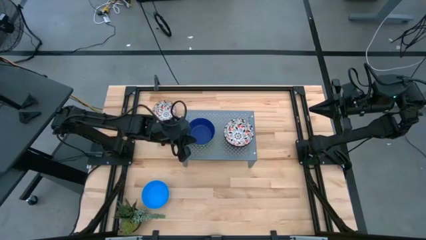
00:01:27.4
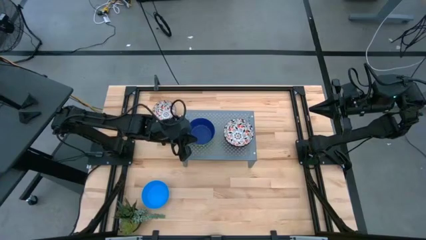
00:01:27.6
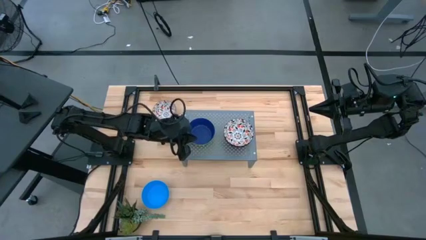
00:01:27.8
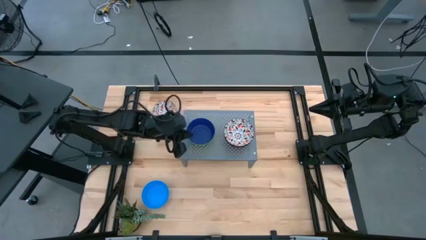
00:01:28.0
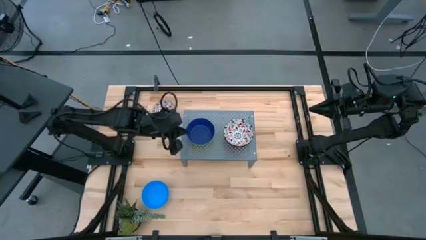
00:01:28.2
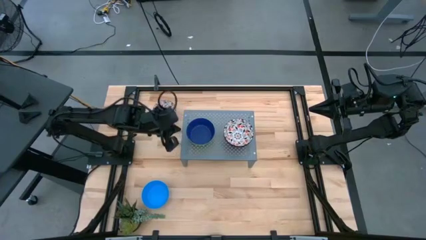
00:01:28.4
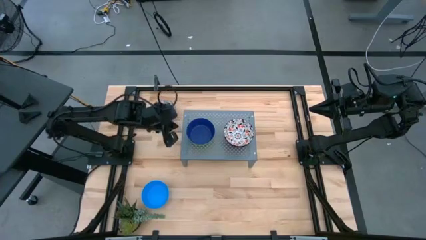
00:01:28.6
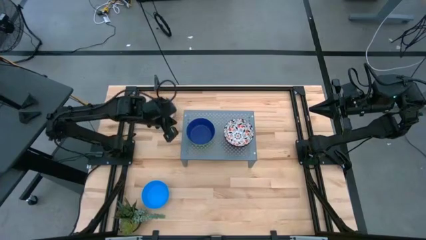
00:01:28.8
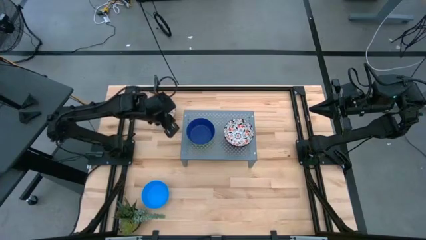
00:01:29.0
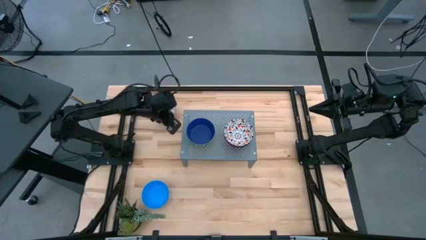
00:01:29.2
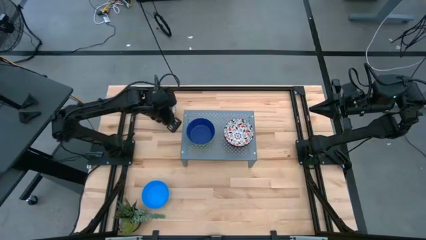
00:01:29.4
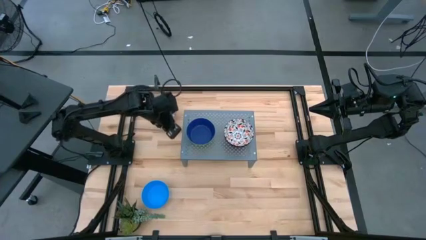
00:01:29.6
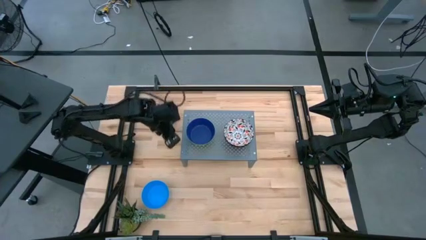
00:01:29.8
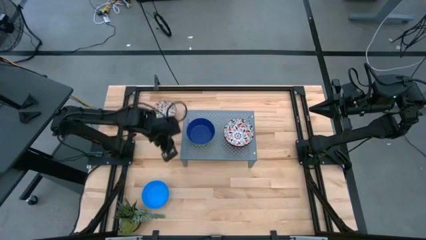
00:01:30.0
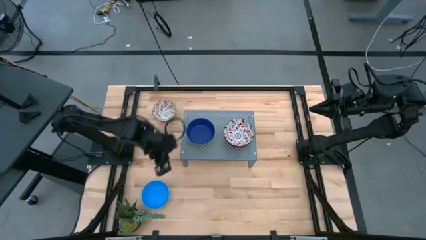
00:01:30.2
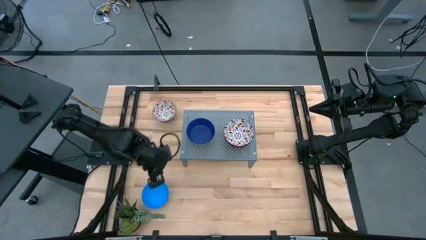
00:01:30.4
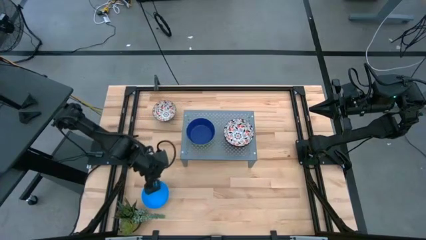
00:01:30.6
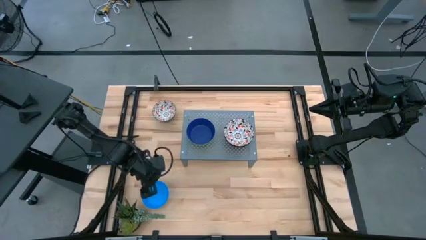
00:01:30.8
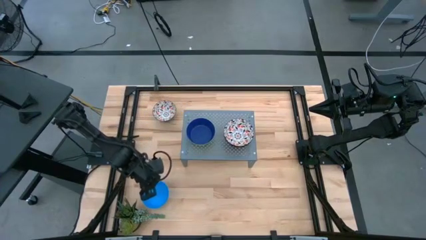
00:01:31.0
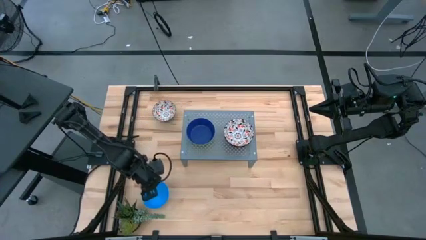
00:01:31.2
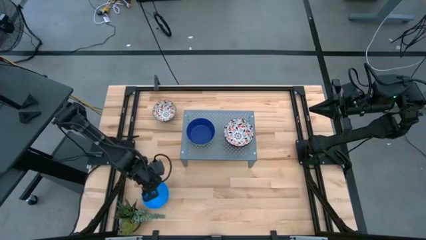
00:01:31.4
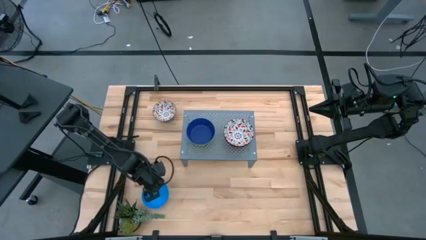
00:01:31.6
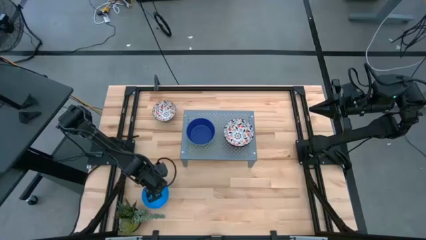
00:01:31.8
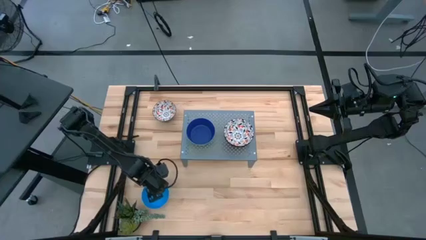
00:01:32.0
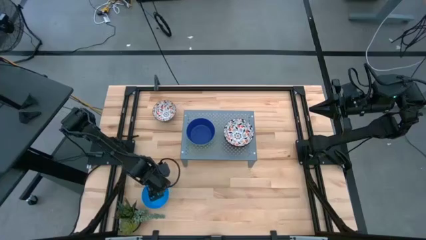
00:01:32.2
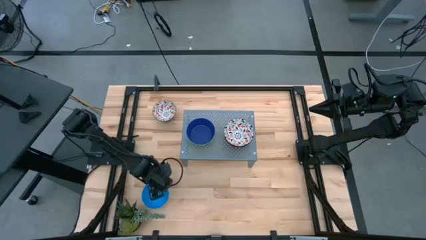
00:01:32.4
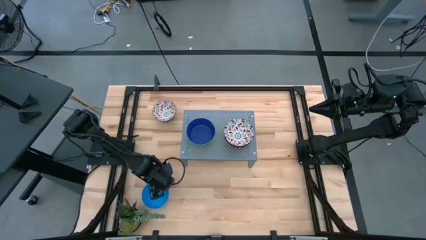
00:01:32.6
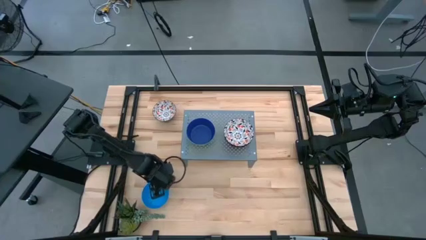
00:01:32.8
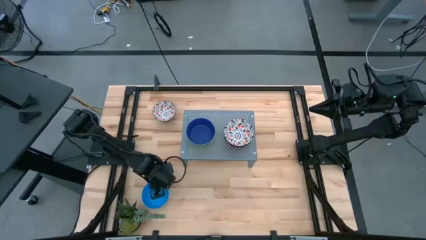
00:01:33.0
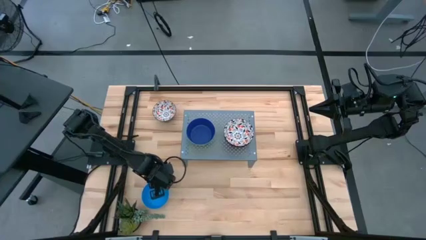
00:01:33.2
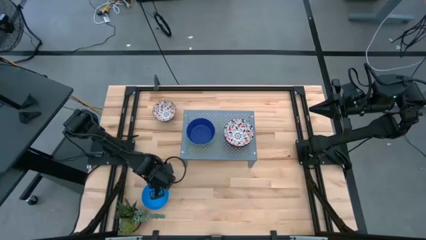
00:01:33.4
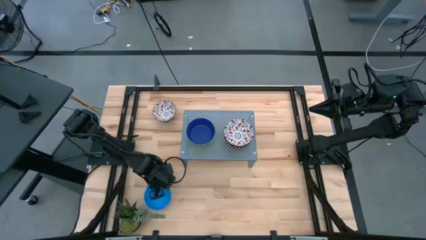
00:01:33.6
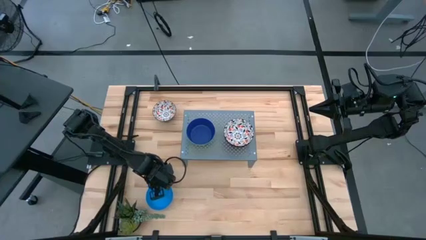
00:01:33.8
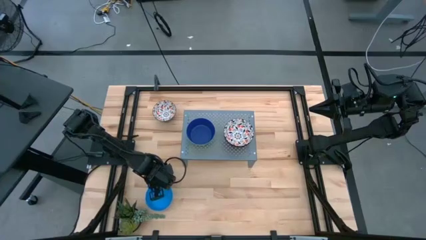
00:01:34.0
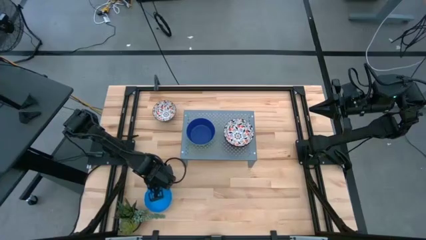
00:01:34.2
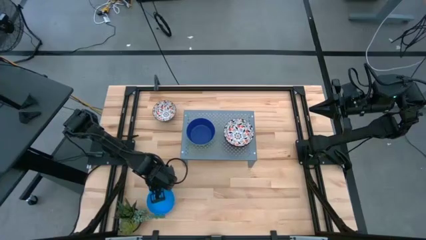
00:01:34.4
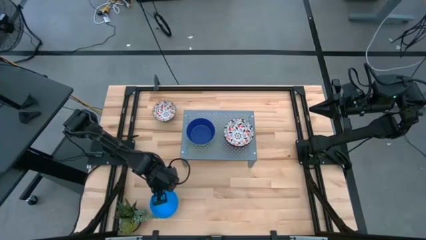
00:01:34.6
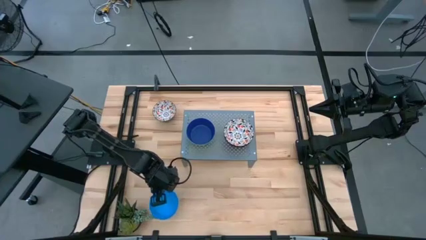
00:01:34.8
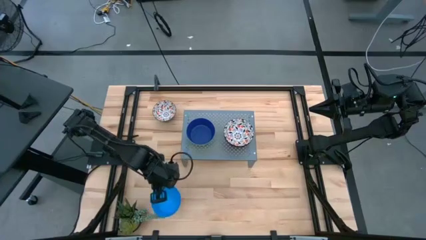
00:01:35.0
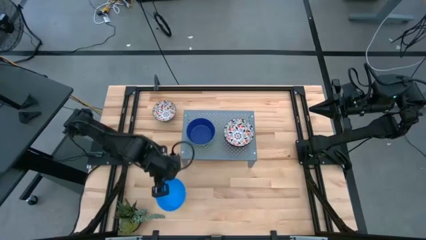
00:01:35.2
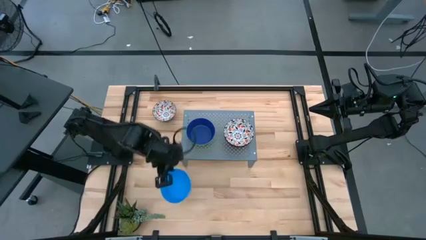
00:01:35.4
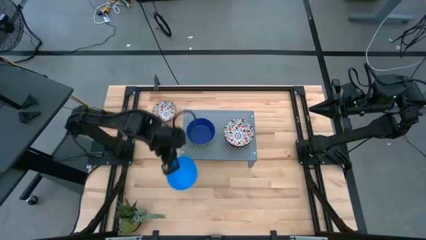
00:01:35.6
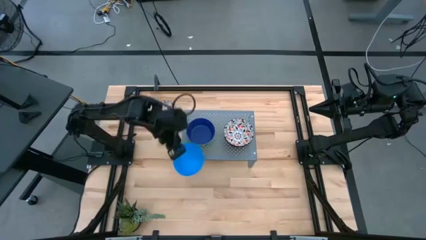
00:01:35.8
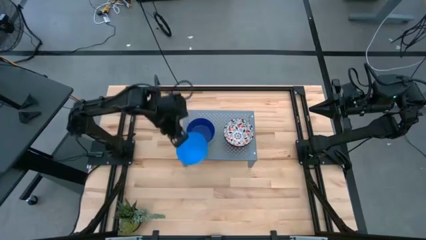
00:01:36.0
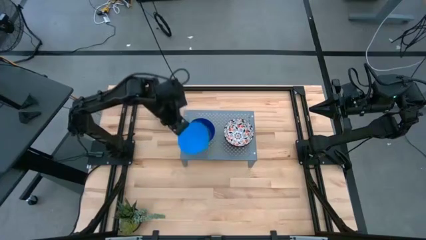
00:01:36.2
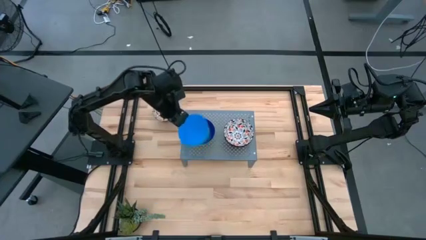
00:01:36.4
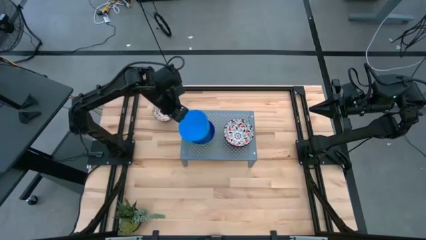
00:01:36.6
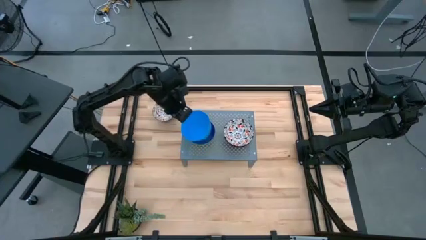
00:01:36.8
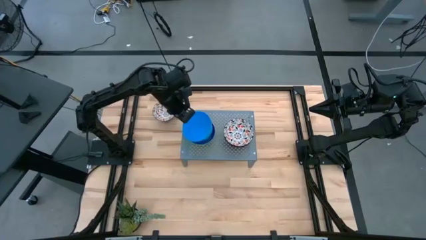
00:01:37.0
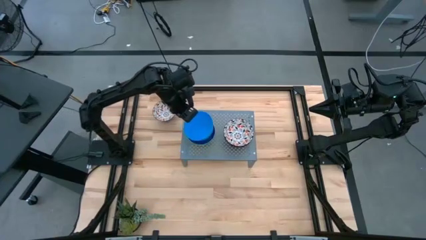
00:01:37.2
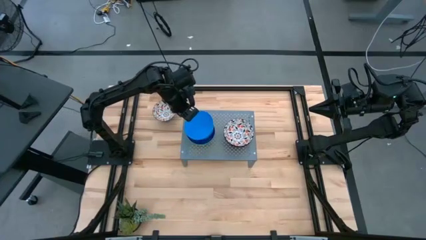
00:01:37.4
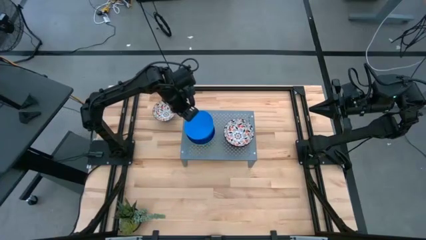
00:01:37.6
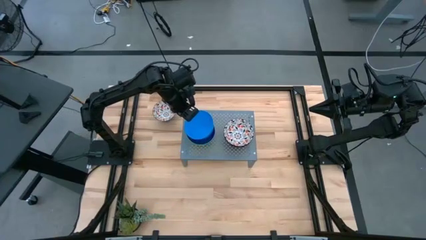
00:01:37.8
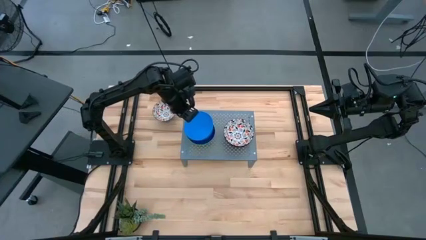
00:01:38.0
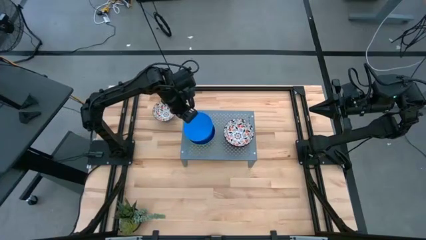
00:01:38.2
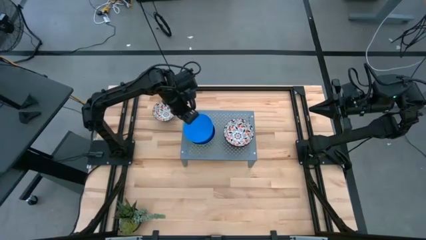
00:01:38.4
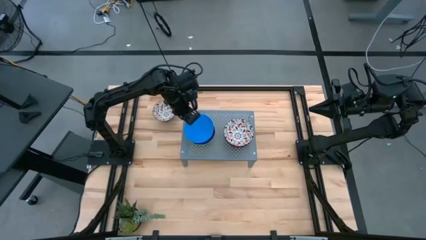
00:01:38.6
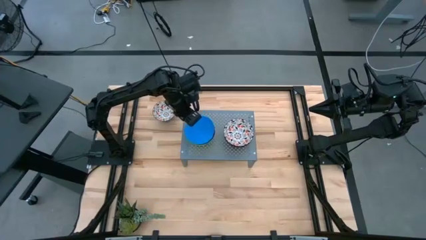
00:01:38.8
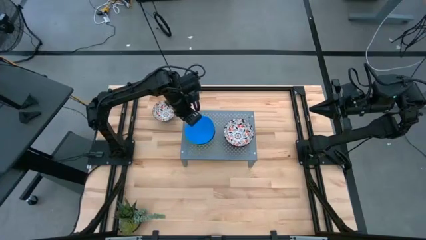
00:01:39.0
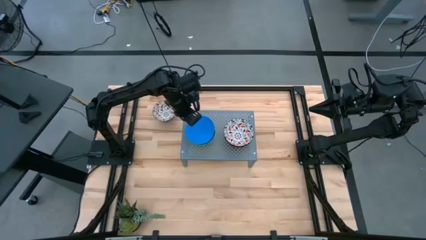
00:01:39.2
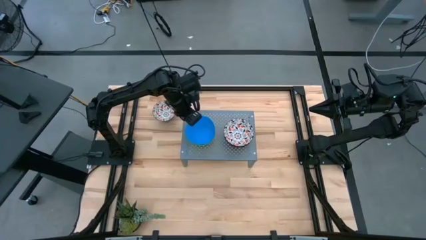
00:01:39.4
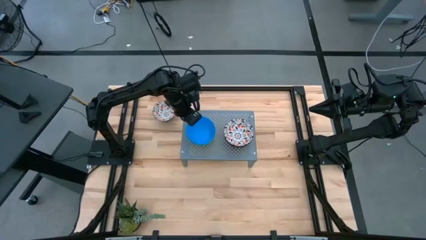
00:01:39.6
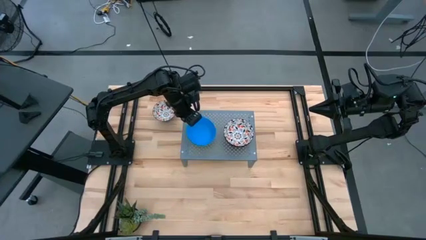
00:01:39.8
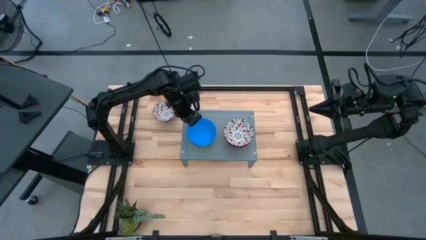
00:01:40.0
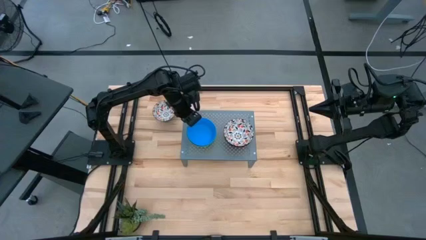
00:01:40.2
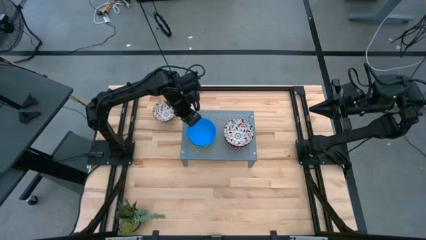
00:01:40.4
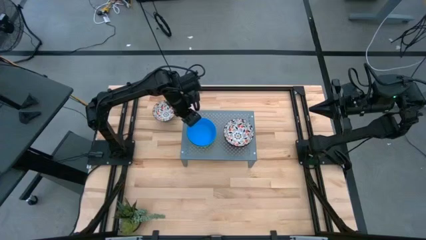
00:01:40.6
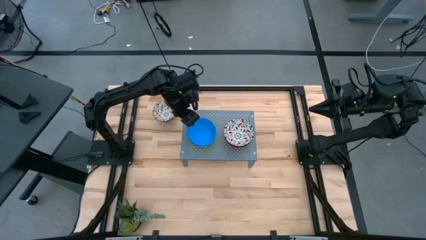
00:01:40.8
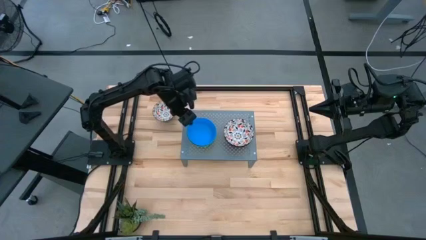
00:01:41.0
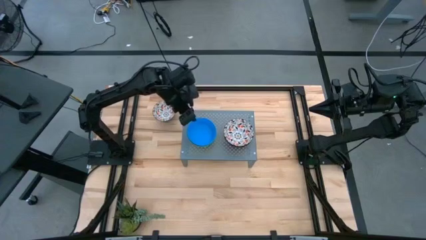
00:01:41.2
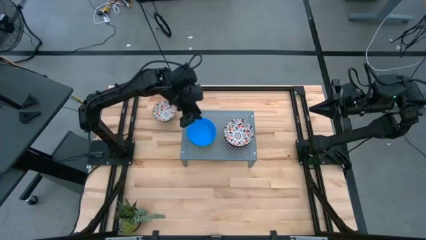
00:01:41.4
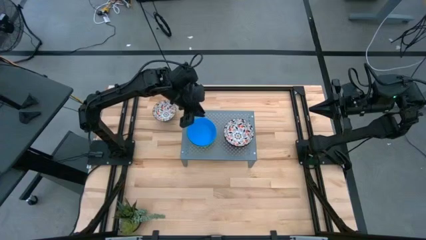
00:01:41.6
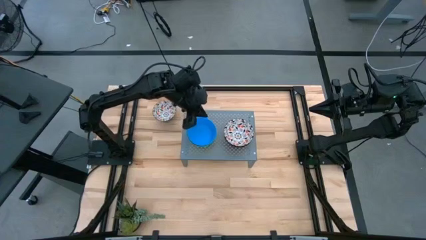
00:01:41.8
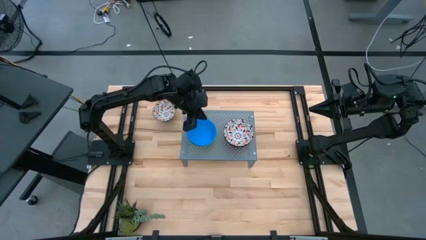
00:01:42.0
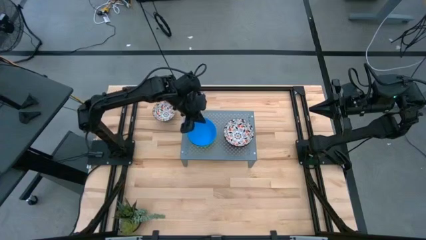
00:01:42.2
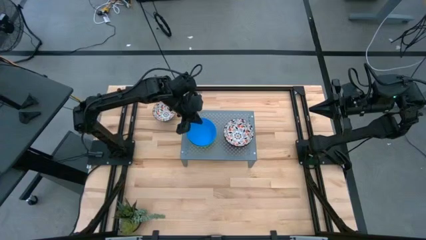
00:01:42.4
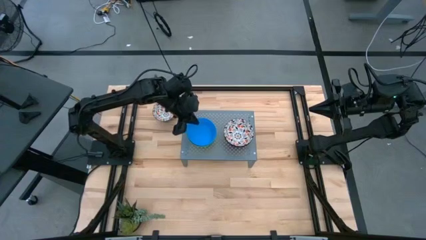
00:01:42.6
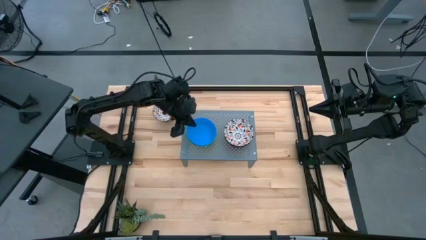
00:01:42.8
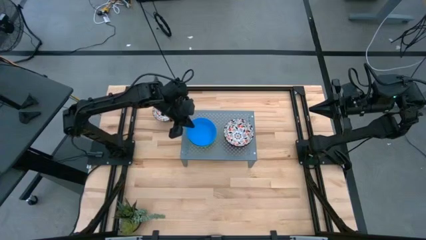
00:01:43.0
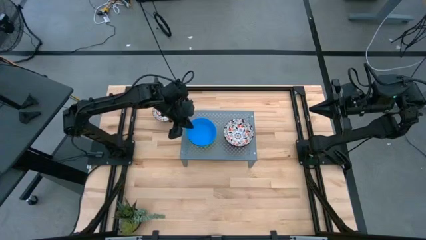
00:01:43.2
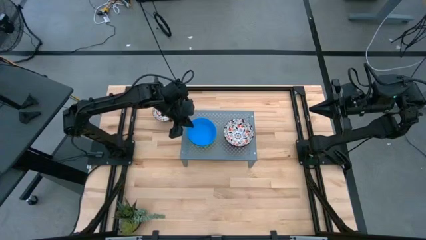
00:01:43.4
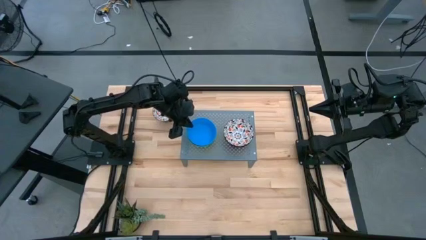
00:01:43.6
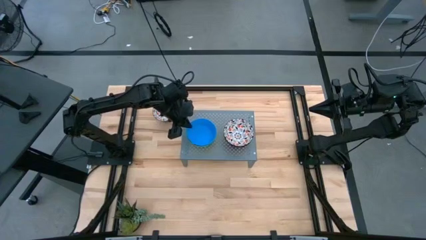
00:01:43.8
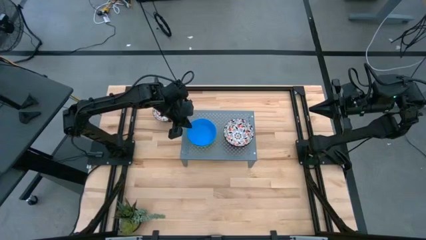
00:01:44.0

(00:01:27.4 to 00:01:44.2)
Task: Pick & Place Mini bowls
Stack the light blue bowl on top of the blue bowl on the shelf

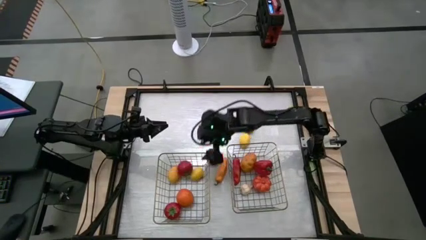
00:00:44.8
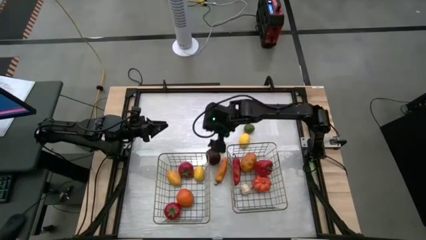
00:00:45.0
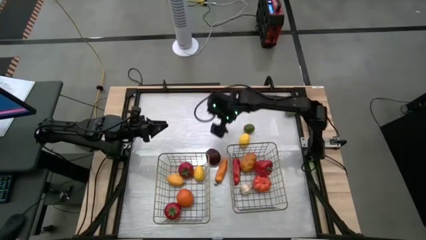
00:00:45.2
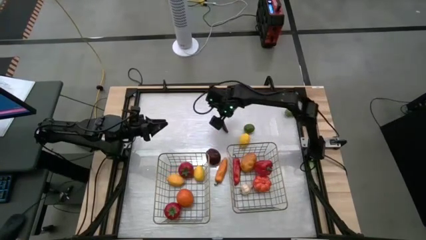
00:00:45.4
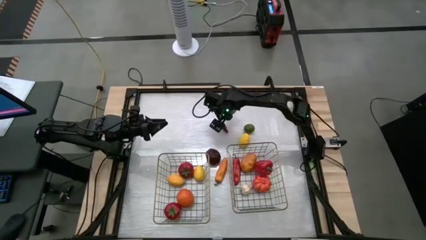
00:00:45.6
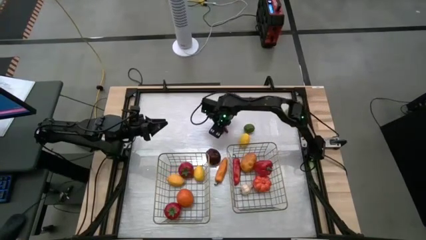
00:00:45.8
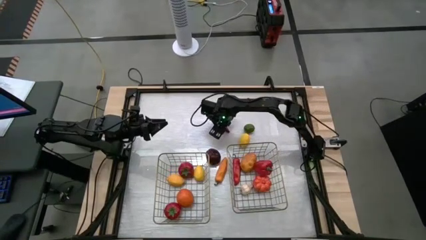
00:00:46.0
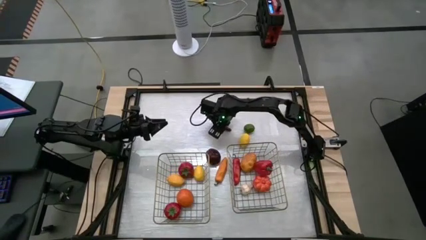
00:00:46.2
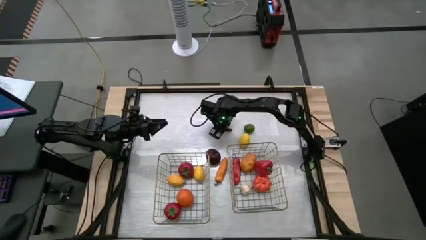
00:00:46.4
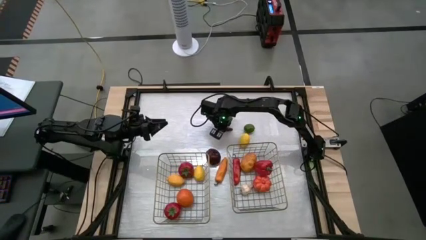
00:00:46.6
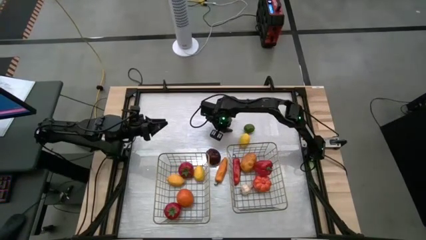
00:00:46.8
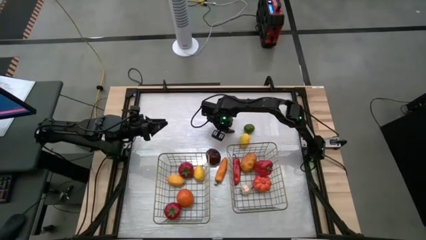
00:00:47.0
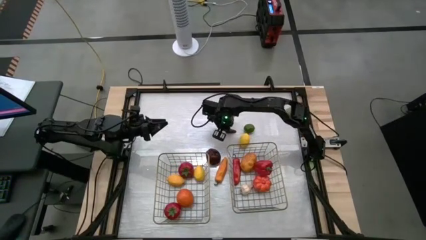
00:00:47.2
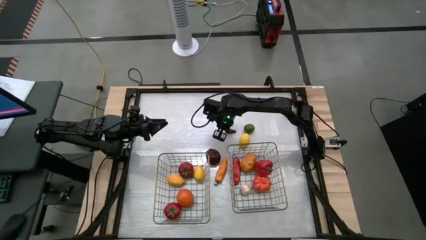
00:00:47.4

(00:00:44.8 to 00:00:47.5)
Task: Sort produce into baskets
Put the eggplant into the right brown wire basket
